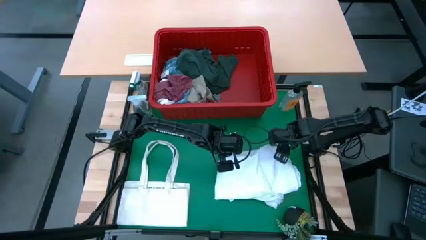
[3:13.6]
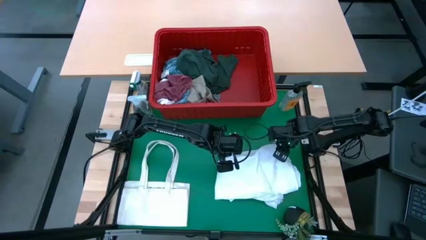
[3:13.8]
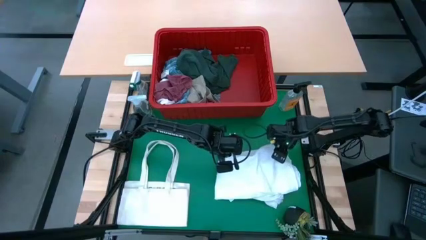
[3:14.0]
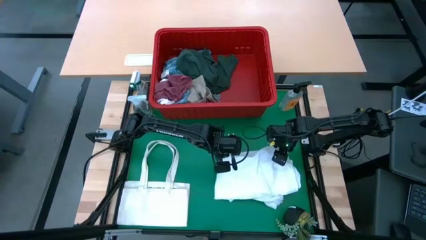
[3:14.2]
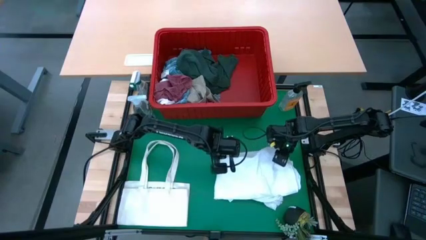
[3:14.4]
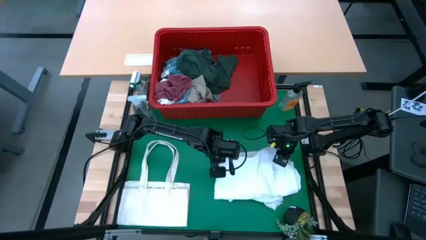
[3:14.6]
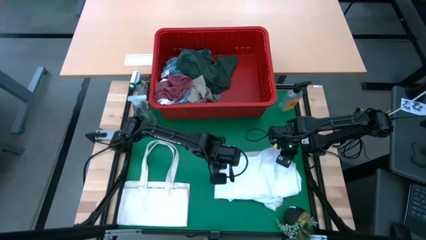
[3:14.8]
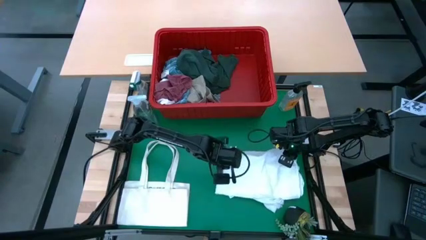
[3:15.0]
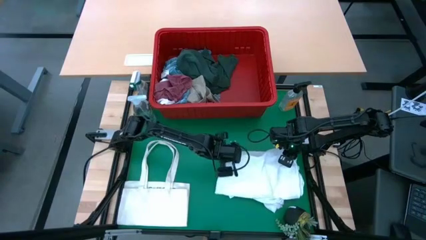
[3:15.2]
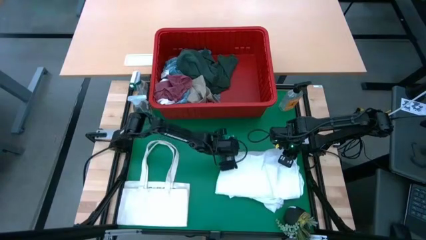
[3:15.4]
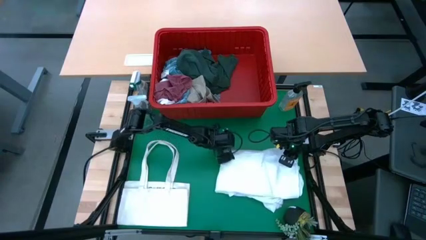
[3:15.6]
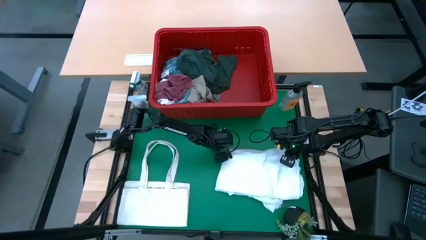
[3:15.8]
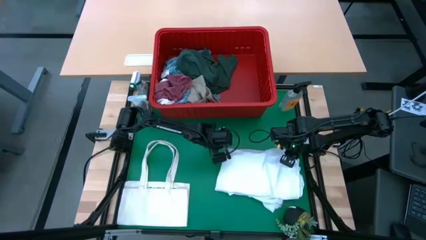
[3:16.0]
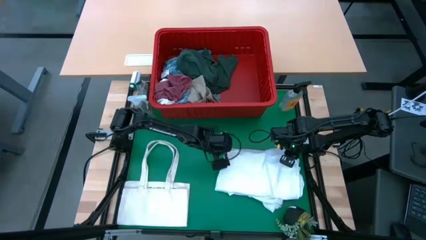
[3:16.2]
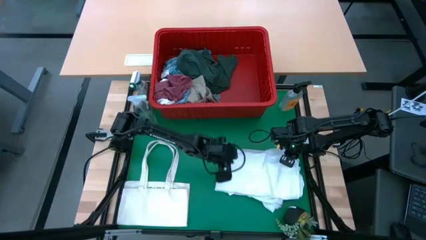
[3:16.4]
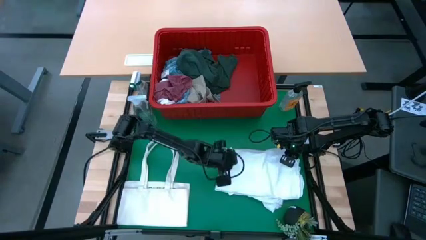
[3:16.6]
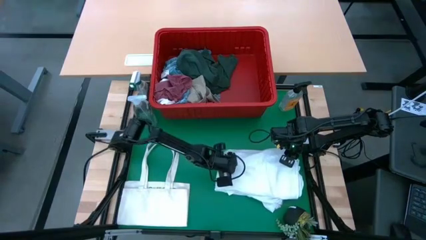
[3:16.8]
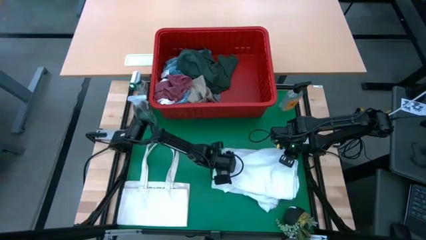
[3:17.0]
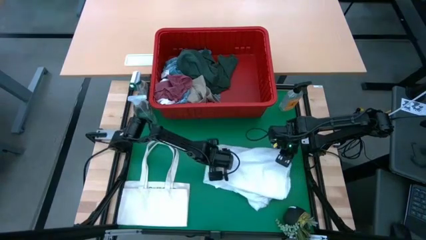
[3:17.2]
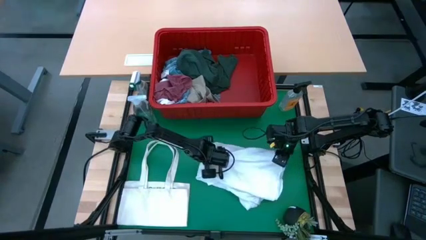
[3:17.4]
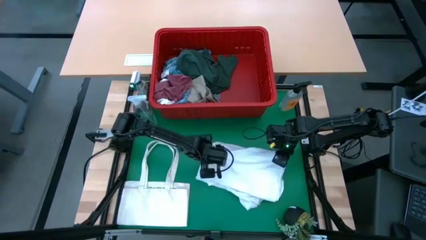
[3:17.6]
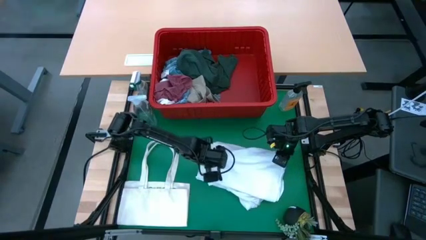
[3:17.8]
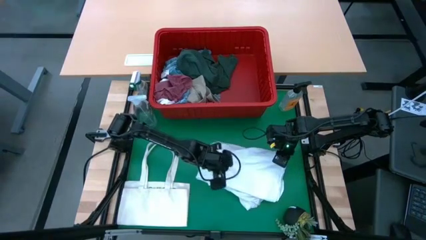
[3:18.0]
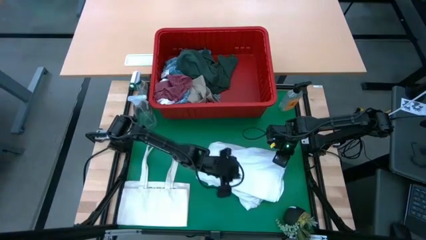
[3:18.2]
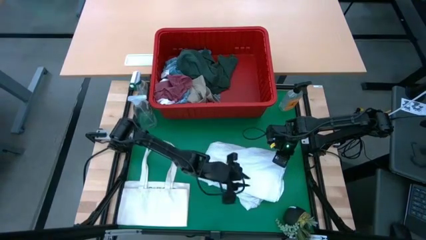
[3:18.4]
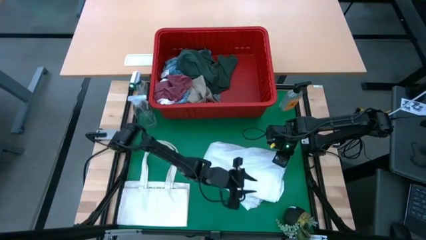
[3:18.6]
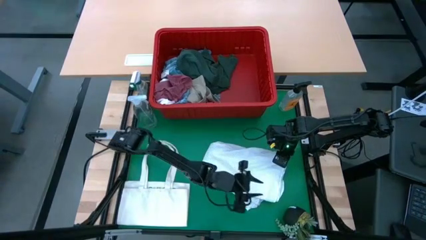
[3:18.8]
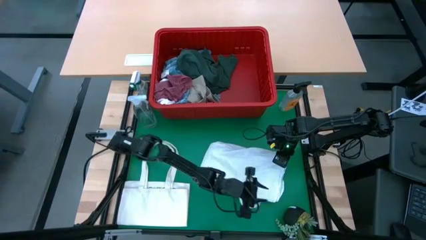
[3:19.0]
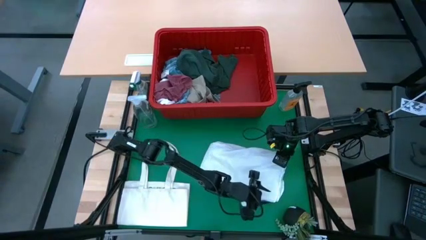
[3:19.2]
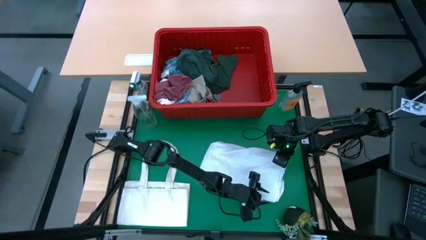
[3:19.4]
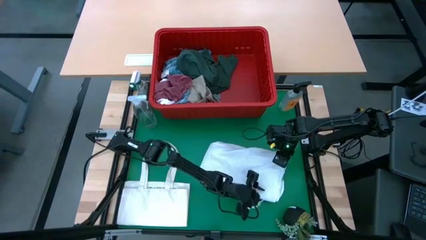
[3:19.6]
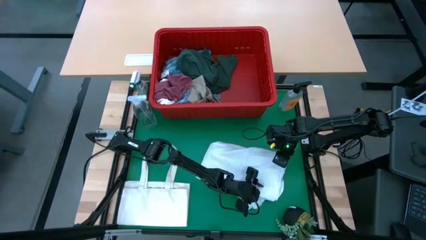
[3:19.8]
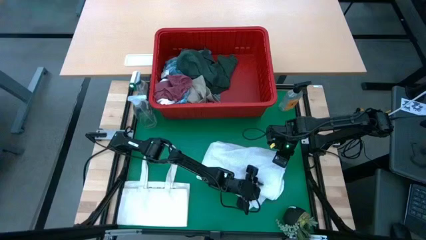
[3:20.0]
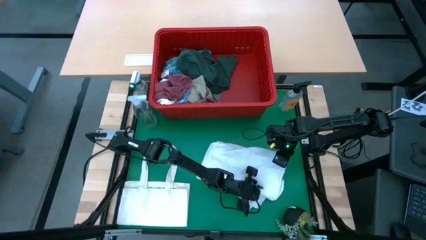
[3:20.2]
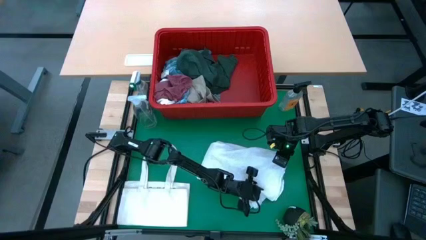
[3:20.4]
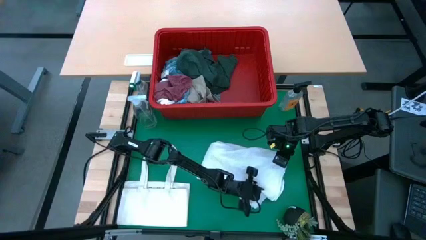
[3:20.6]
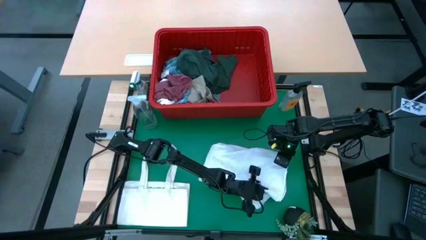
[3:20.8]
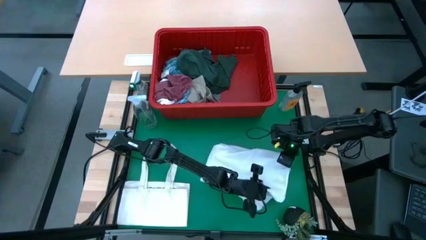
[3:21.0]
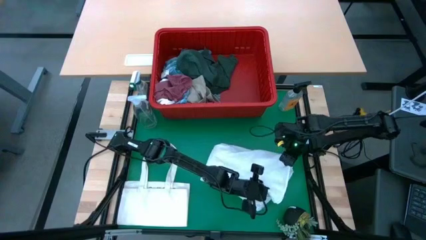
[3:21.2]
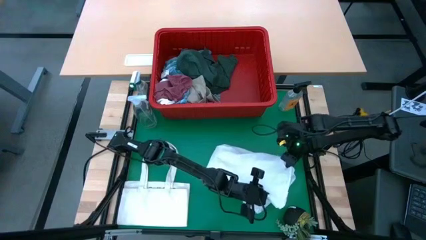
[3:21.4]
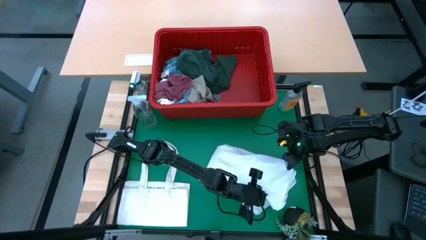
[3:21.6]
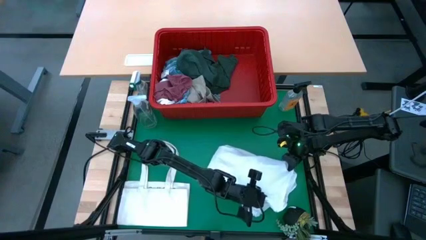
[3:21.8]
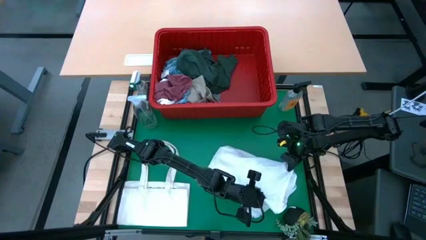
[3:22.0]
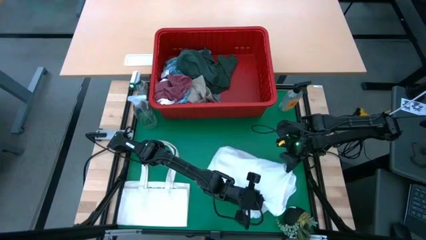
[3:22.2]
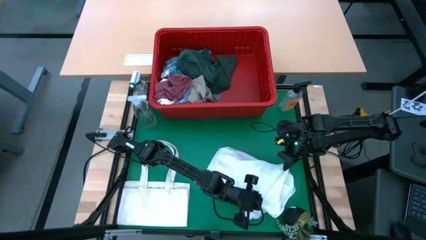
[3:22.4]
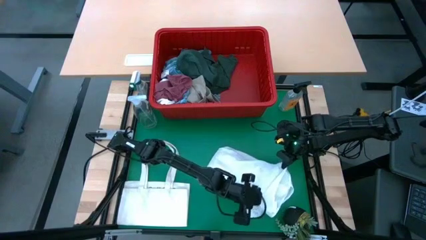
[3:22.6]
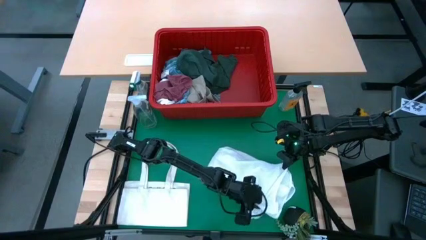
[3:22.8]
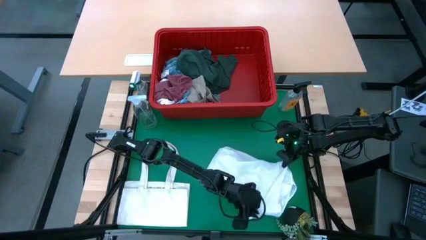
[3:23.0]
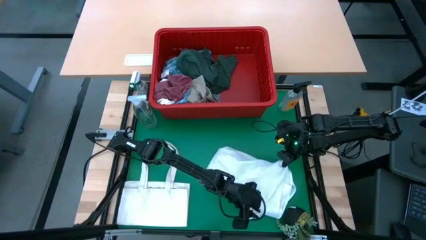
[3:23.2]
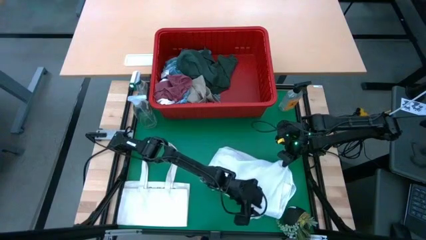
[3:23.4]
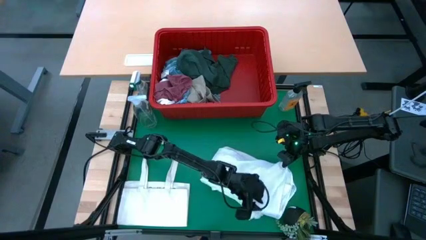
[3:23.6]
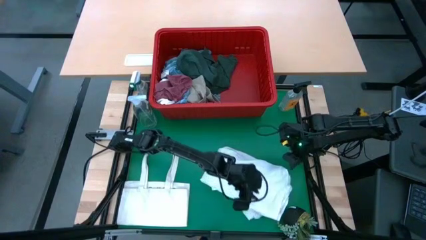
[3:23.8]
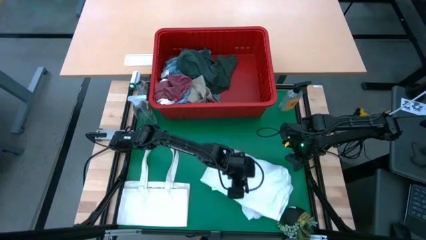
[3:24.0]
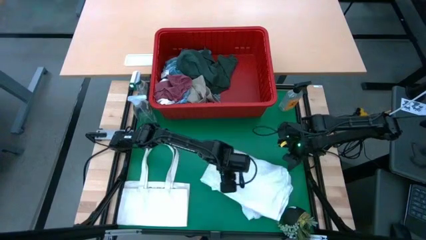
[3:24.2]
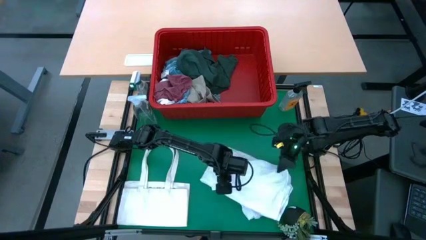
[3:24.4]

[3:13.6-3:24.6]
Task: Fold Laundry from Bin
Fold the white polo shirt
